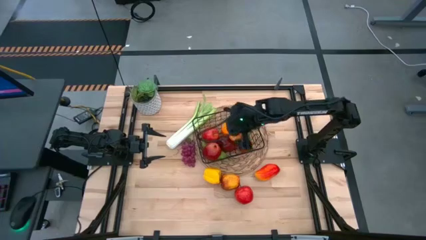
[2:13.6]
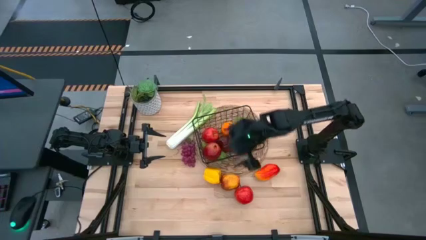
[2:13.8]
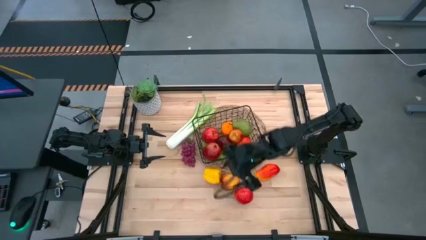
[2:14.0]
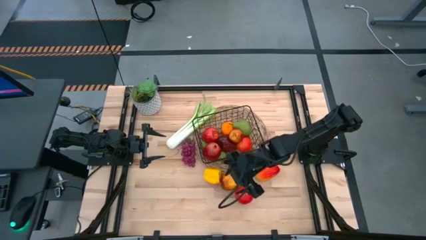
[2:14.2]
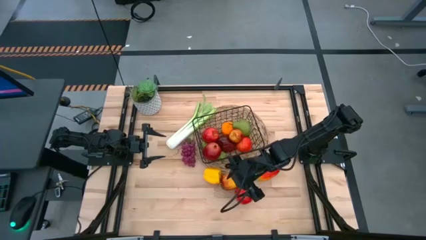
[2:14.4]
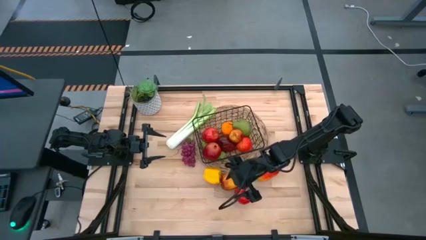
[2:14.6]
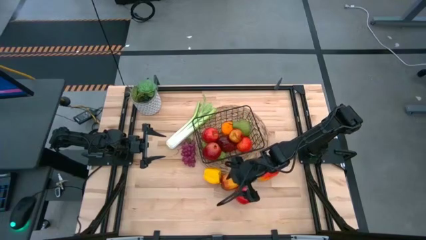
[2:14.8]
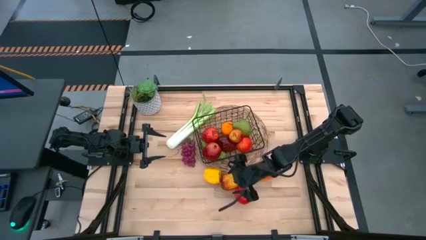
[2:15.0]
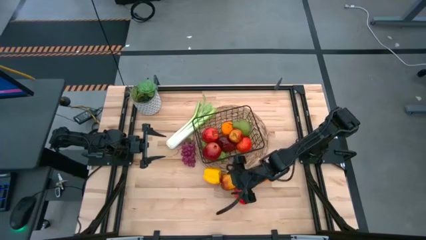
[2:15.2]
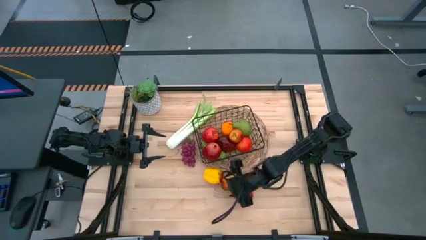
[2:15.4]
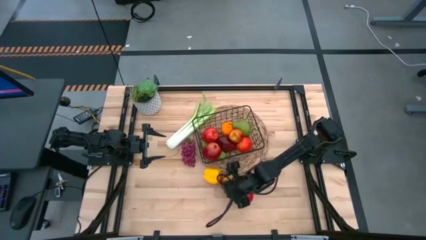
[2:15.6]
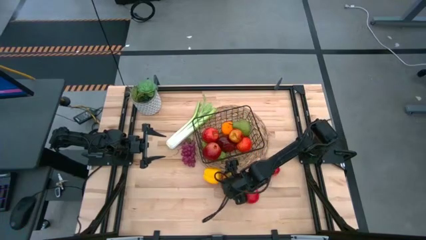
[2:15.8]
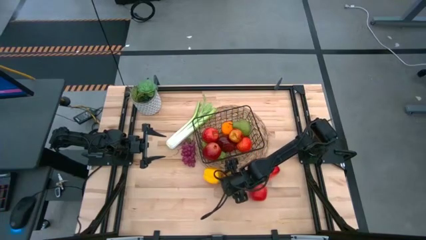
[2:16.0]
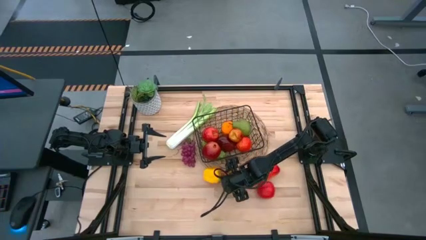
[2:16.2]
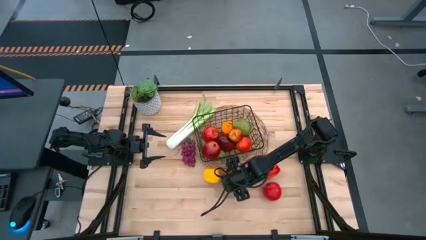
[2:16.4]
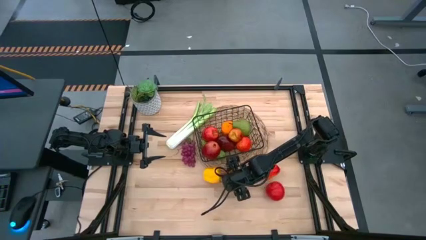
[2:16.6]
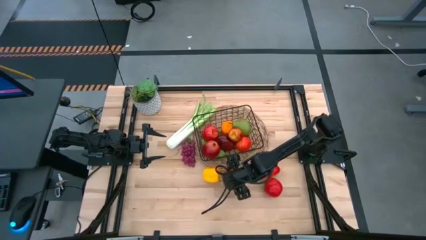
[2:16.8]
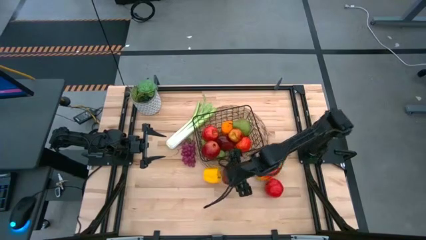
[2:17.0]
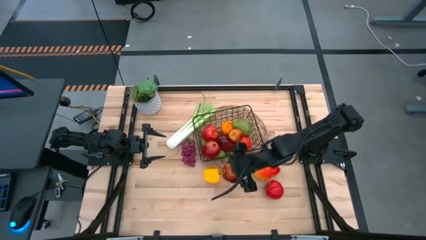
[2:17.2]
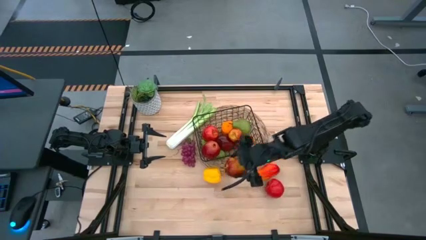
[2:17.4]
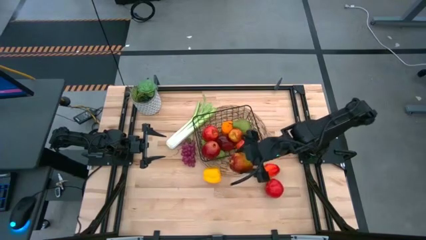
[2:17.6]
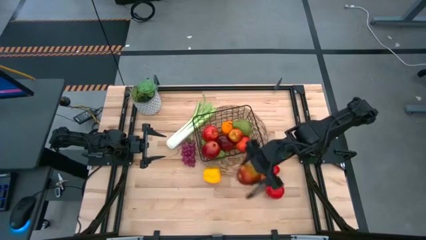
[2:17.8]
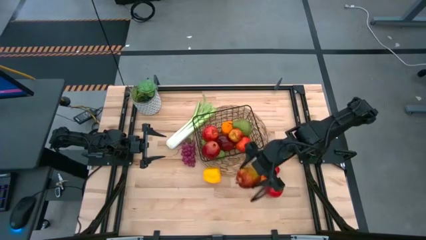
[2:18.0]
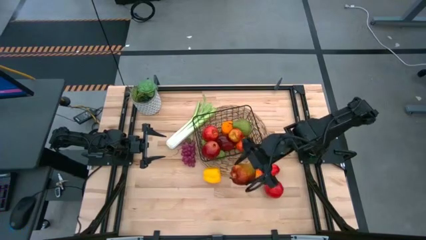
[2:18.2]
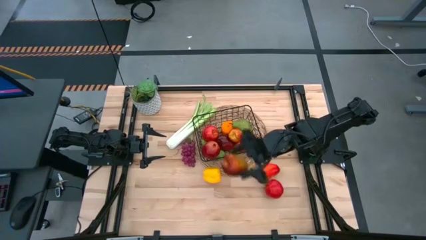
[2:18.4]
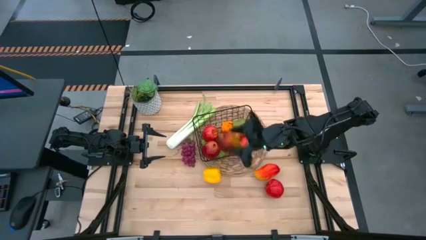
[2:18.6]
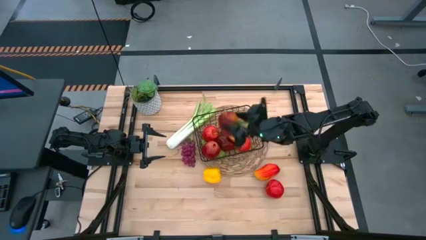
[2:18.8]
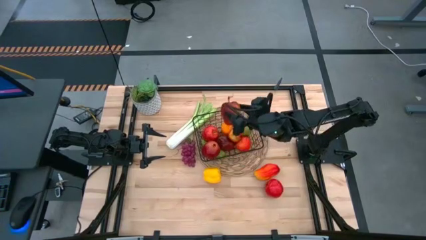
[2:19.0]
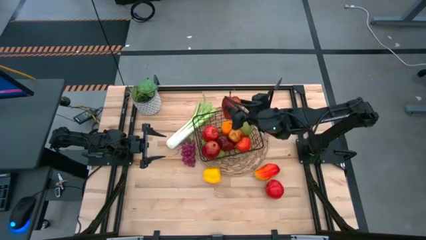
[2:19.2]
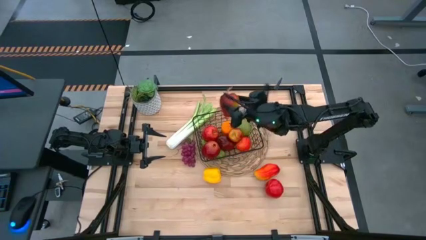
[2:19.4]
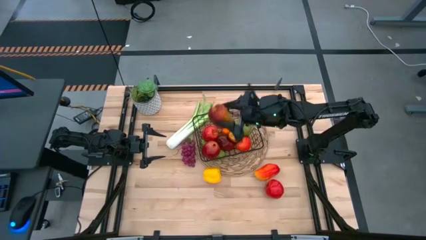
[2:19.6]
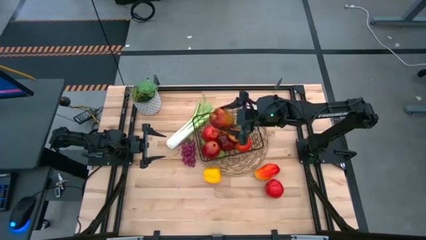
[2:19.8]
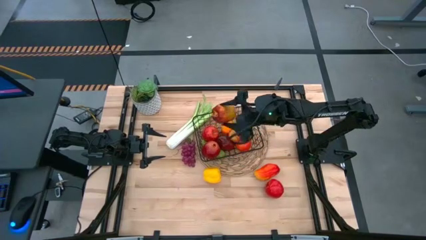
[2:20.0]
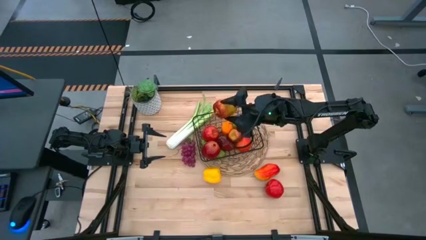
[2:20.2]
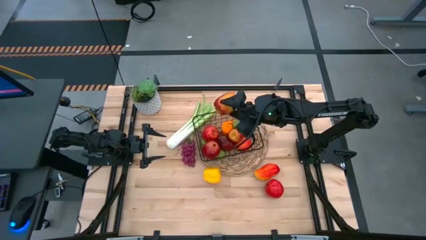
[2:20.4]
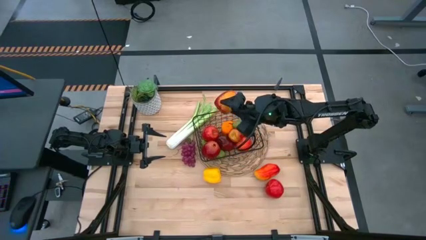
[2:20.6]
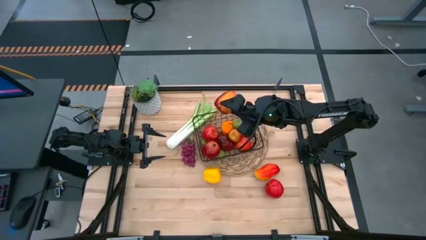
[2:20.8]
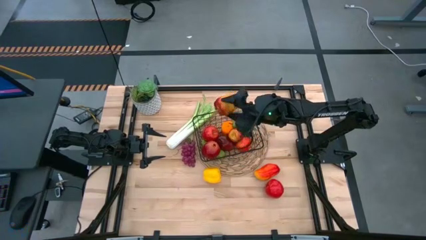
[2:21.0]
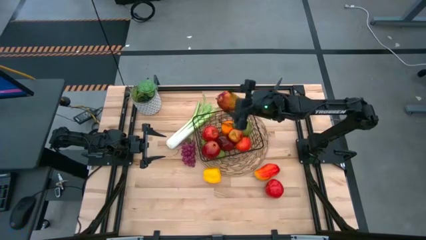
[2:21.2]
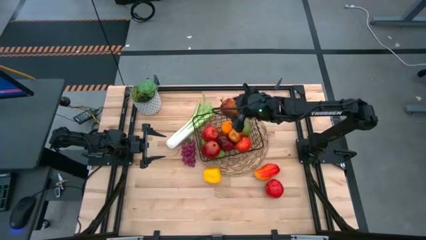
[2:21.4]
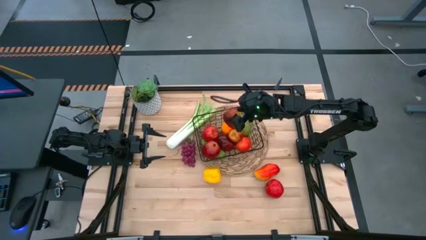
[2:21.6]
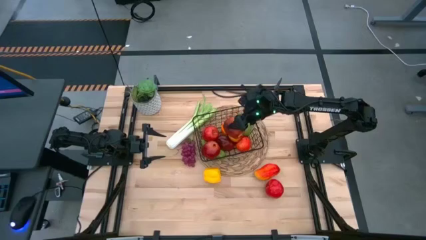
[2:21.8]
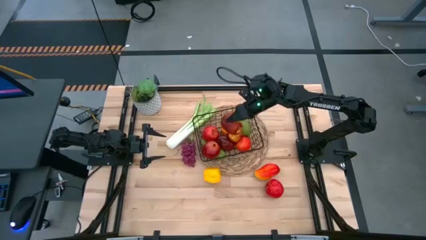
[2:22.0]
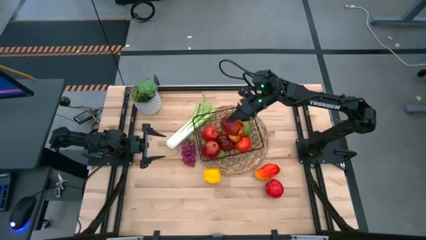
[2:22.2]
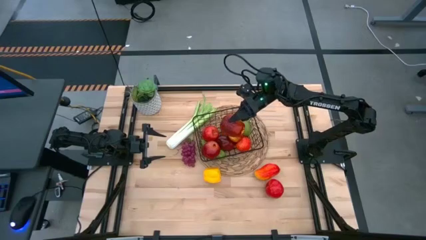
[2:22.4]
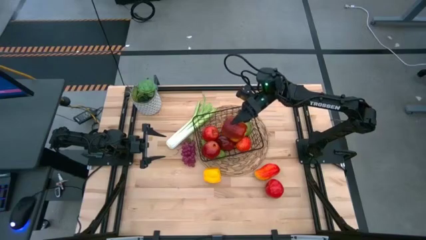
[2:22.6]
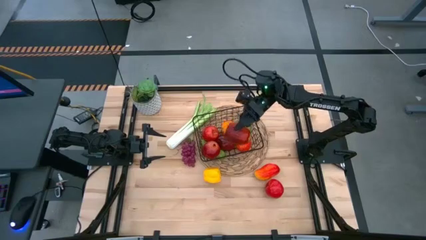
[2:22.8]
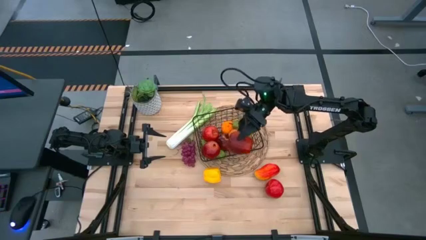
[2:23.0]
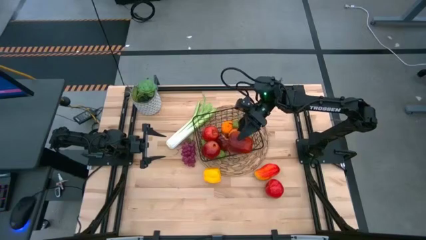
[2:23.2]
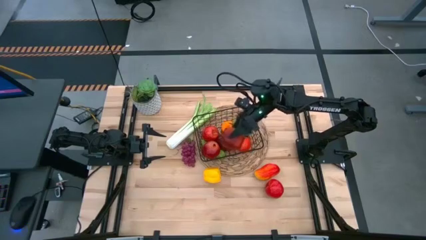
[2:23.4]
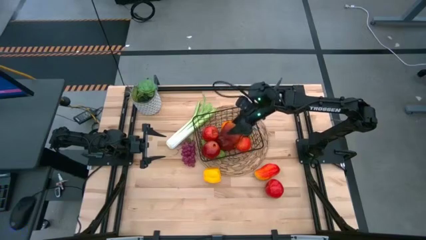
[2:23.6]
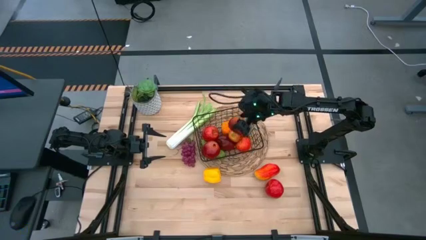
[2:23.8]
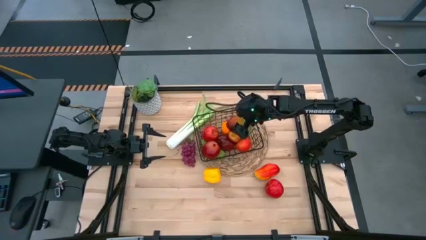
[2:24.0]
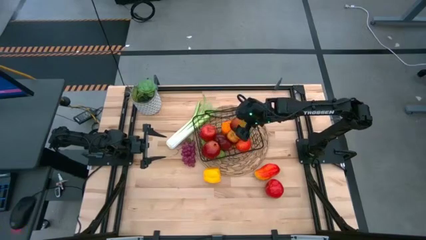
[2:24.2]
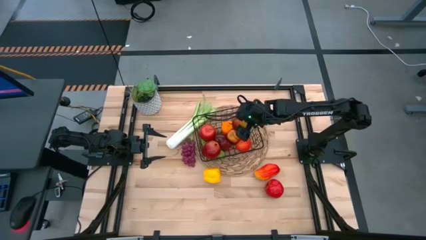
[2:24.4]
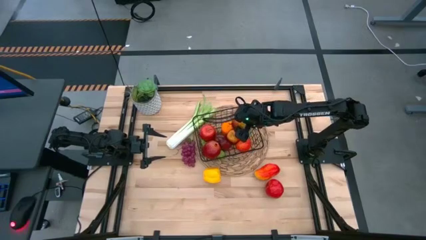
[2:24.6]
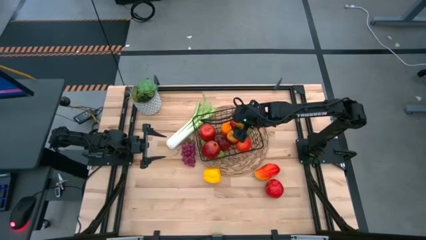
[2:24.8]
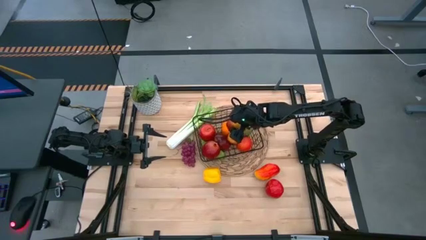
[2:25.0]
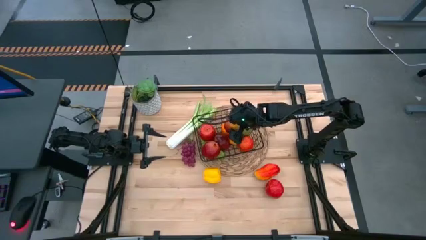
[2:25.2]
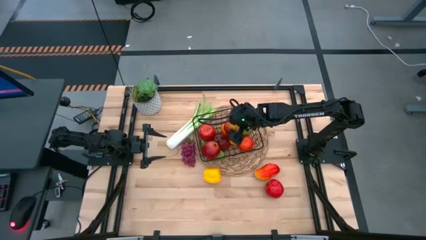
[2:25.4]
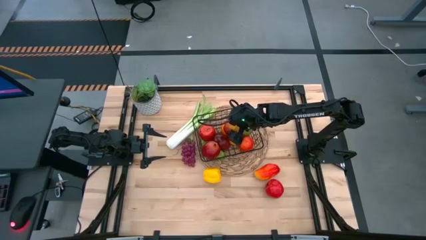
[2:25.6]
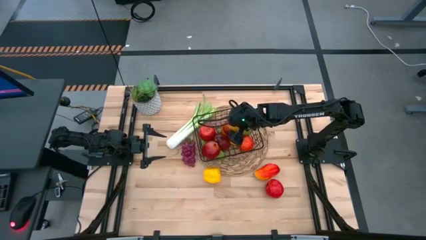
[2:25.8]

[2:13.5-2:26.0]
Task: Build produce basket
Put the red apple into the black wire basket
